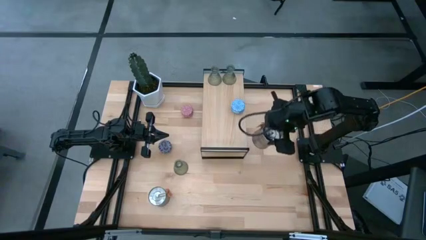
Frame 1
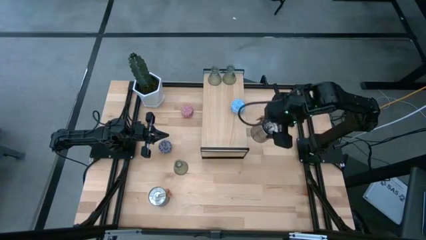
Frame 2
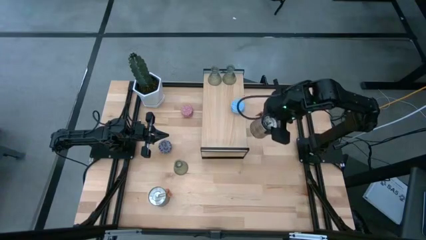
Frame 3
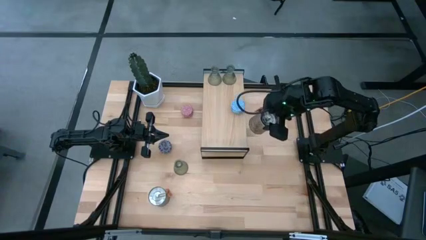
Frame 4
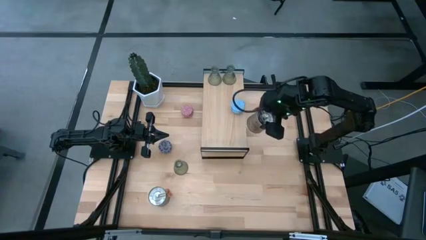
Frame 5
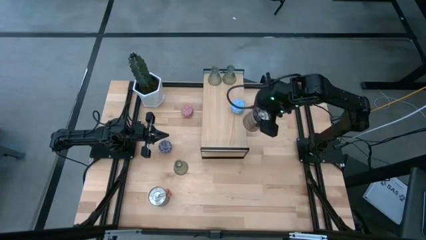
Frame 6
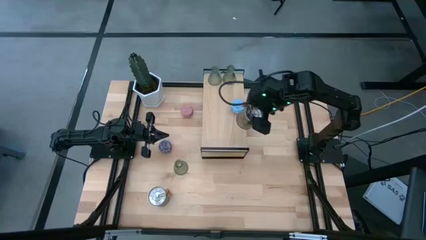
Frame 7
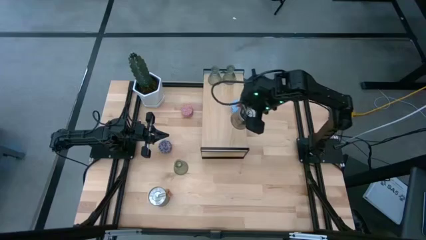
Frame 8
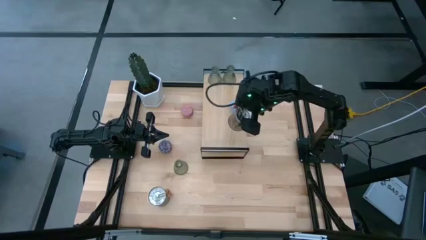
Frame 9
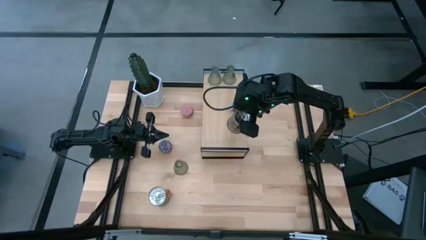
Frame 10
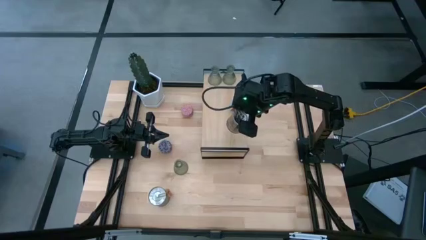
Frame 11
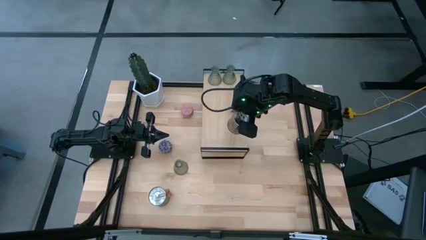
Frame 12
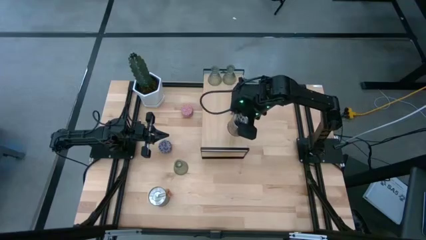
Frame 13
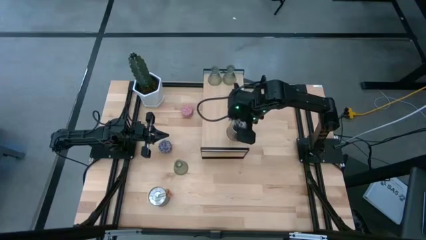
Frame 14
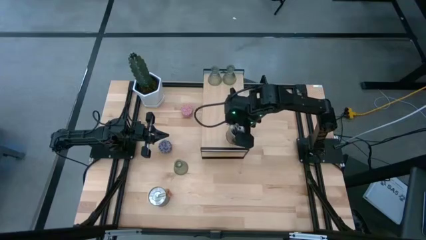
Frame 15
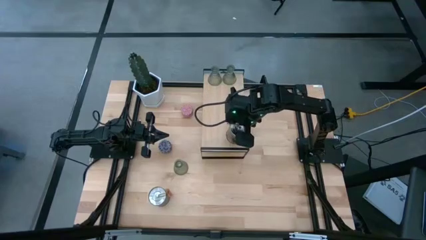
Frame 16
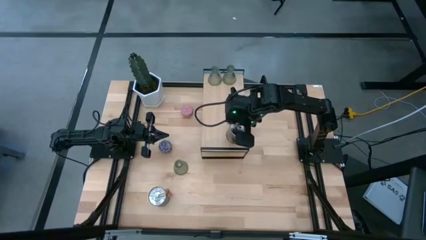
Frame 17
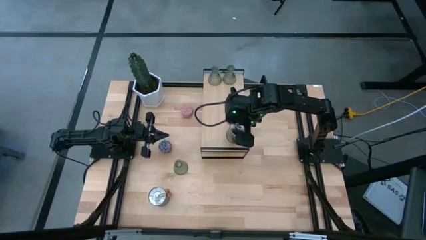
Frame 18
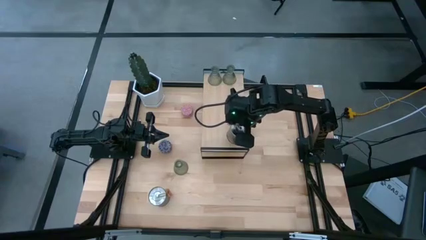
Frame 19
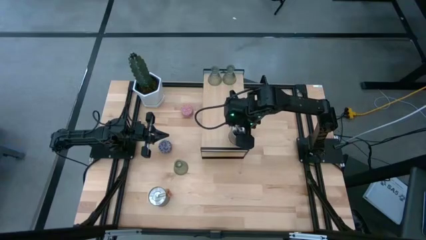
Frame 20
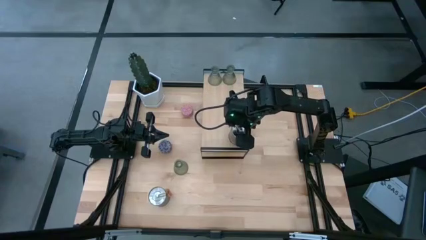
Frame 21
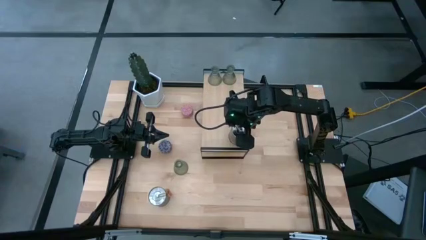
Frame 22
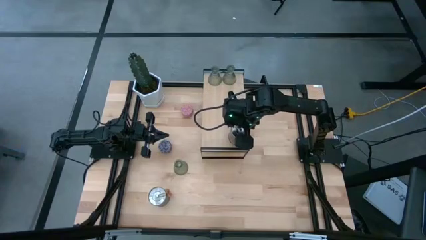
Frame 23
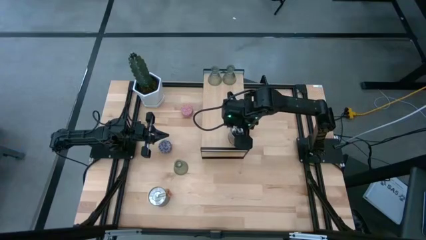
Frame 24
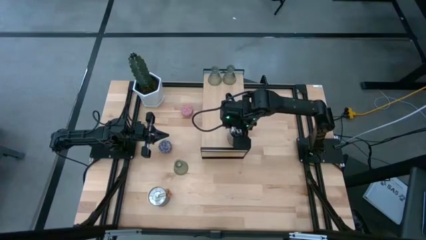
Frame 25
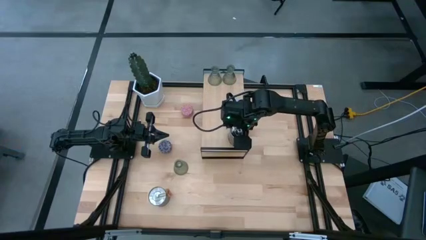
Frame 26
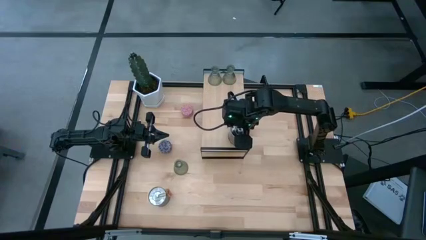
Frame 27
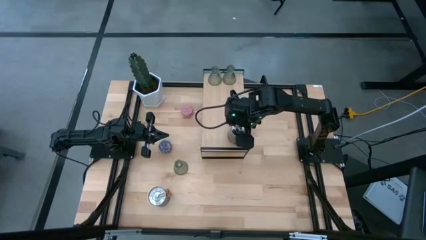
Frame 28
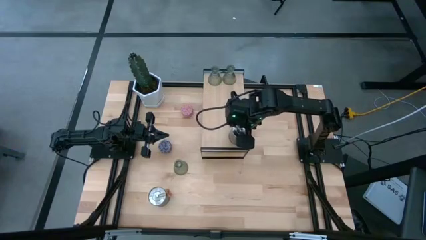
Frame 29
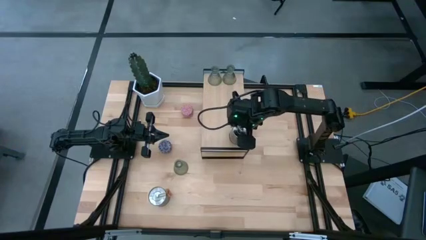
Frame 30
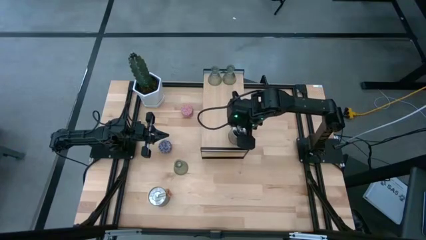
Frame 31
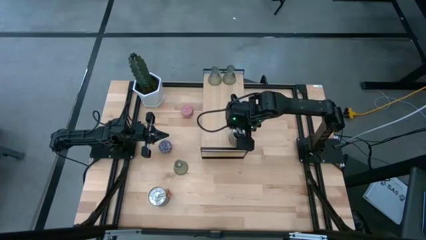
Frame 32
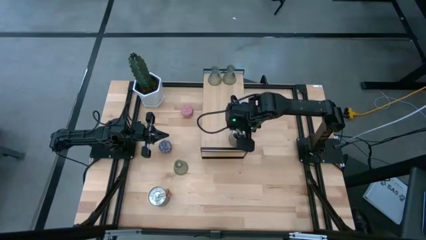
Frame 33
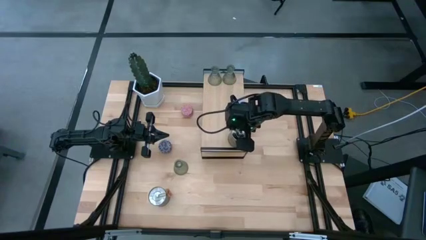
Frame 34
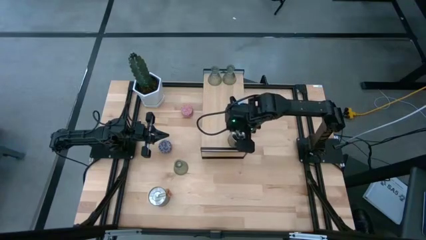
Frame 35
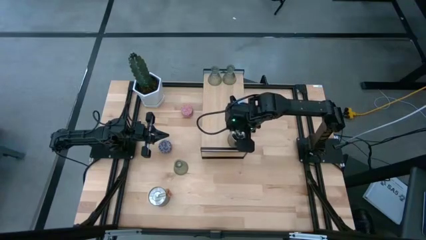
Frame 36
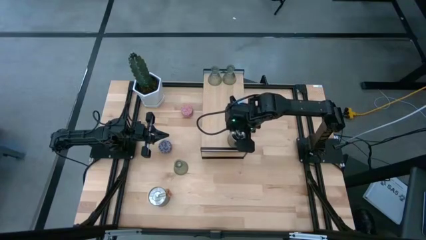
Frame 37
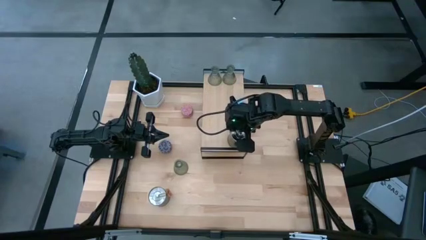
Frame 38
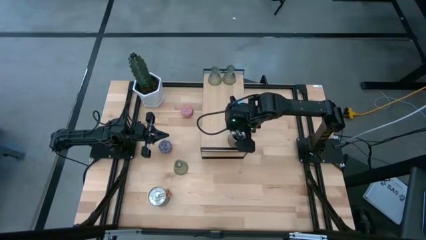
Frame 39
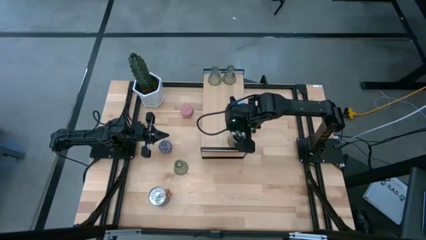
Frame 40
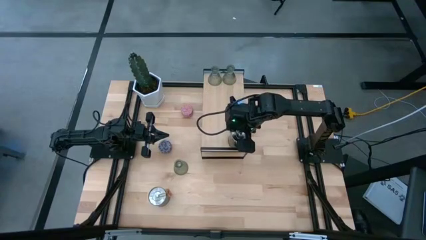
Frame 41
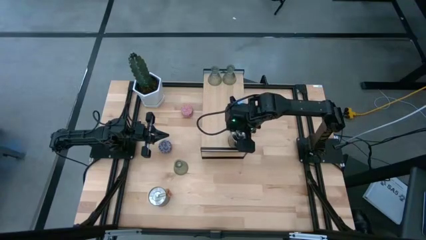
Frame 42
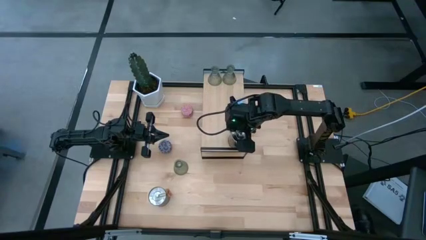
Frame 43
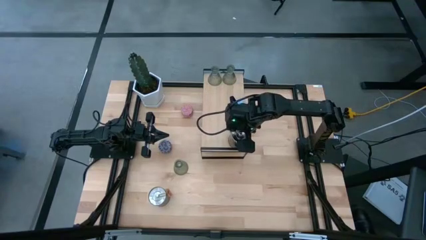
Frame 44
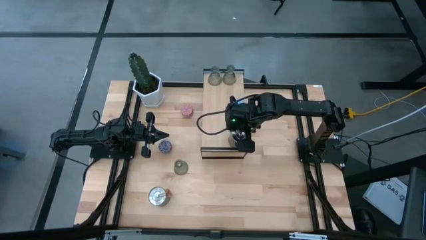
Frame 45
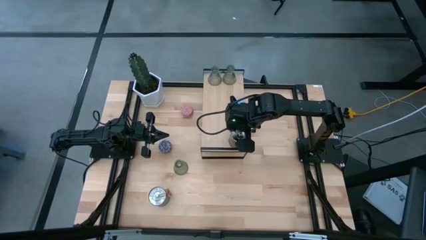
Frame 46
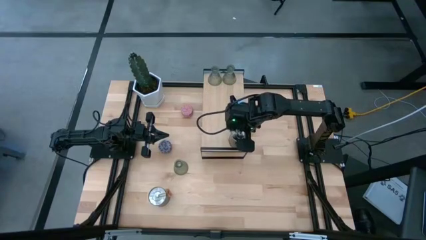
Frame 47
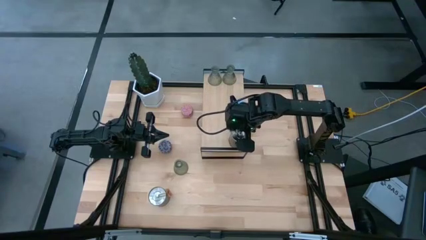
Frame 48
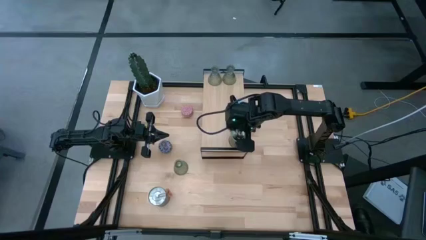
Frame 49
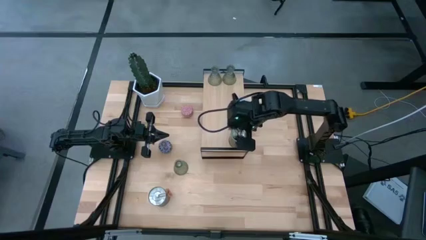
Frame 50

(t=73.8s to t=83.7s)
Task: Pick & Place candle stick holders
Put the right silver scented candle can on the shelf

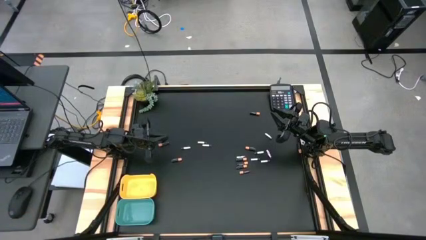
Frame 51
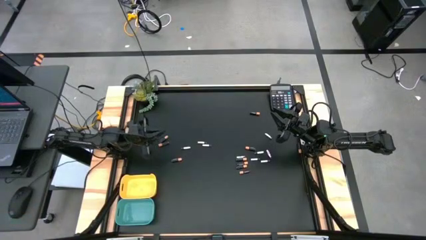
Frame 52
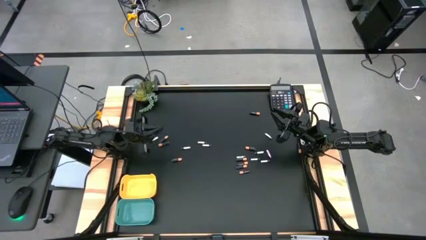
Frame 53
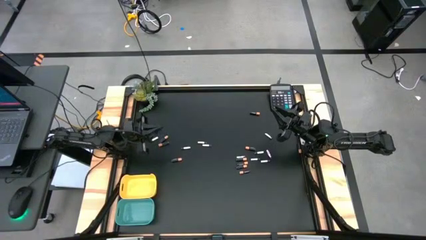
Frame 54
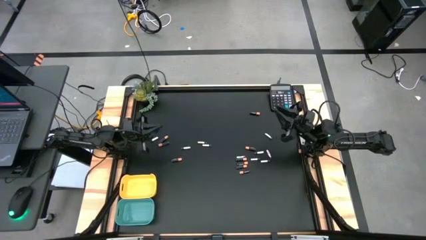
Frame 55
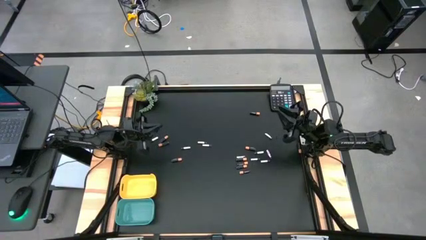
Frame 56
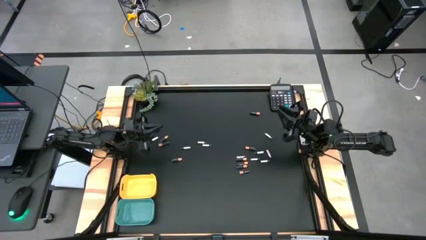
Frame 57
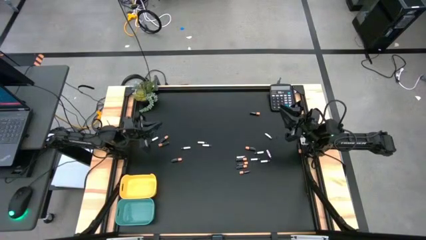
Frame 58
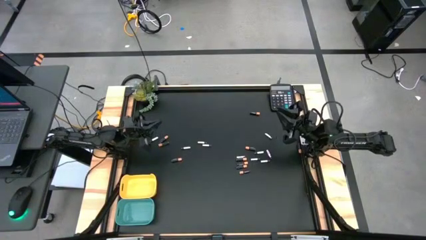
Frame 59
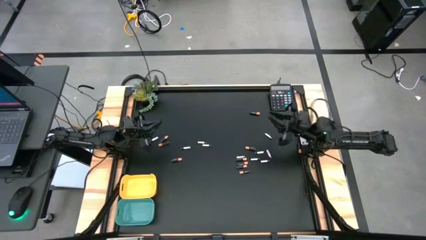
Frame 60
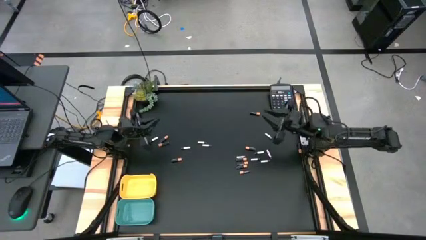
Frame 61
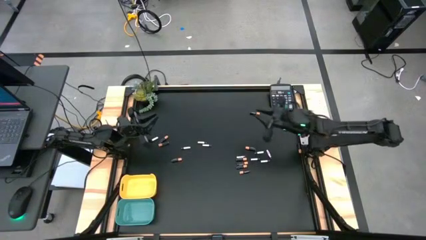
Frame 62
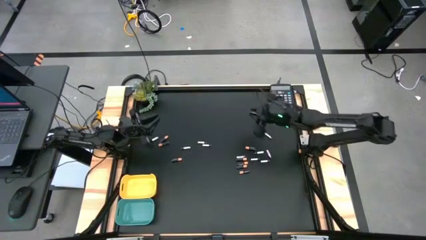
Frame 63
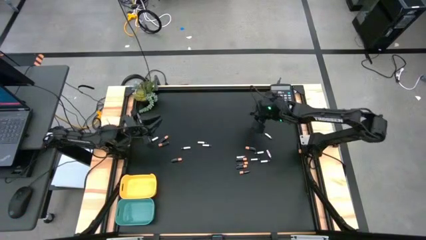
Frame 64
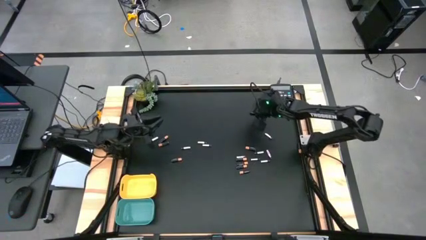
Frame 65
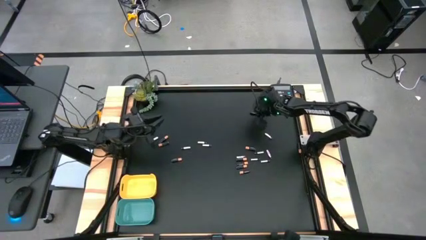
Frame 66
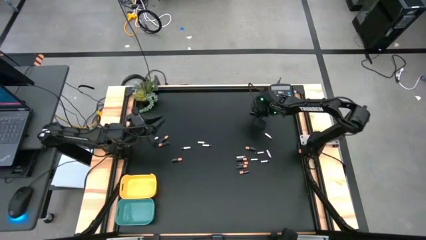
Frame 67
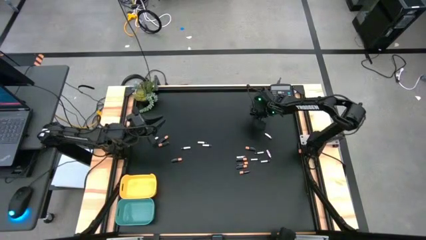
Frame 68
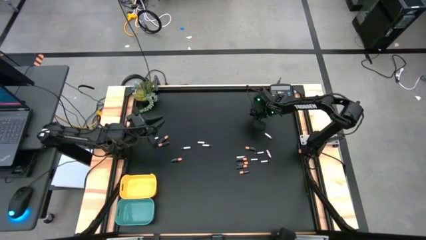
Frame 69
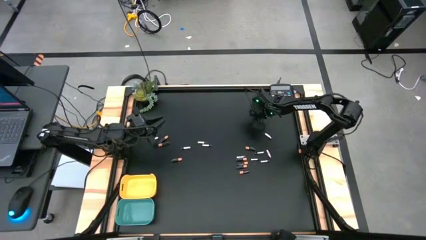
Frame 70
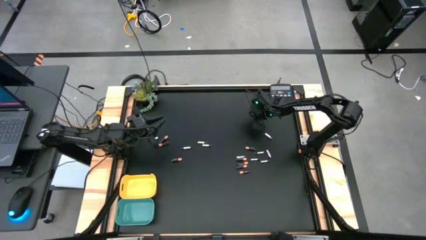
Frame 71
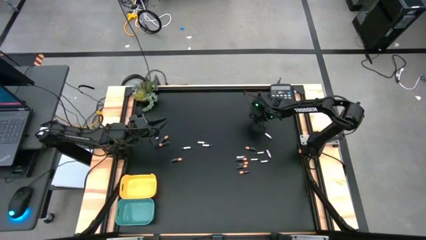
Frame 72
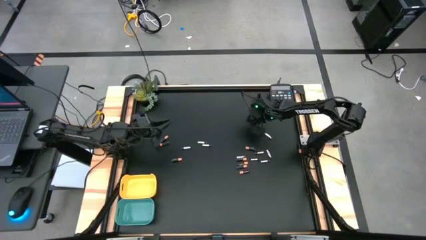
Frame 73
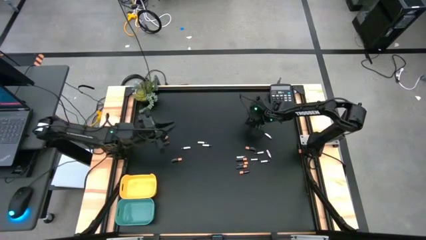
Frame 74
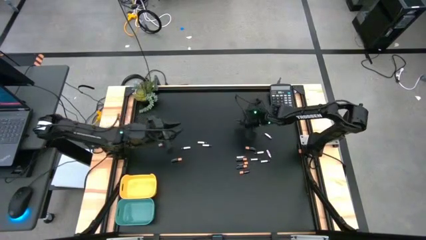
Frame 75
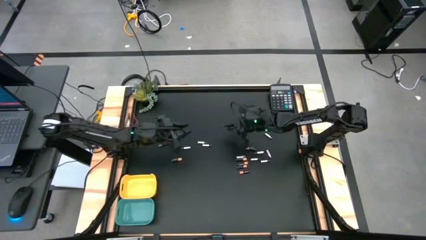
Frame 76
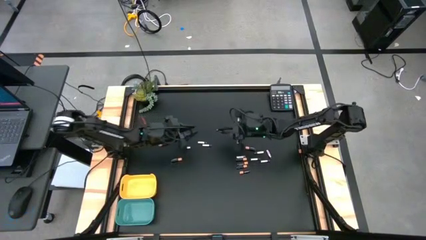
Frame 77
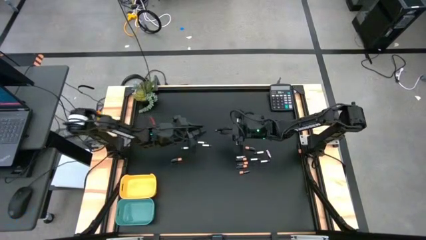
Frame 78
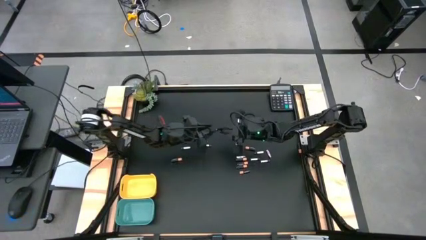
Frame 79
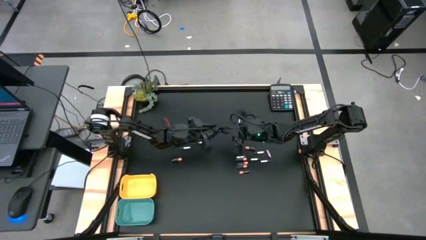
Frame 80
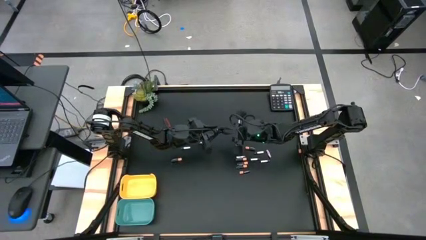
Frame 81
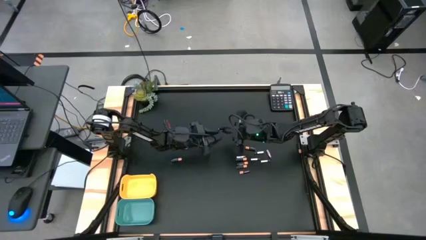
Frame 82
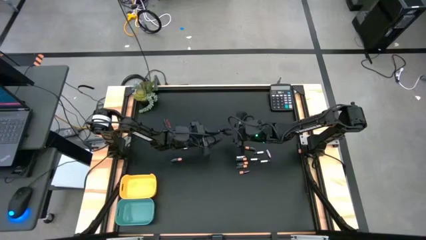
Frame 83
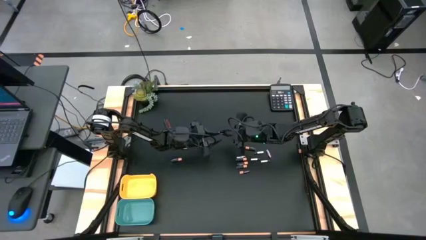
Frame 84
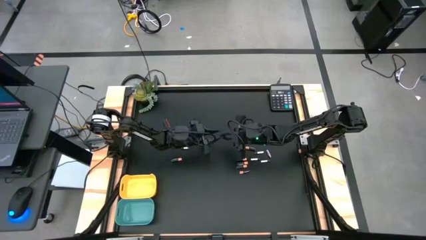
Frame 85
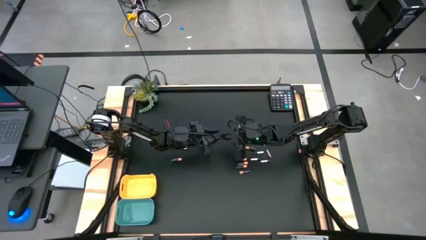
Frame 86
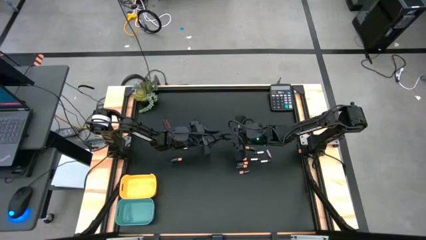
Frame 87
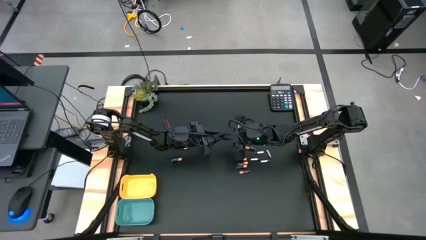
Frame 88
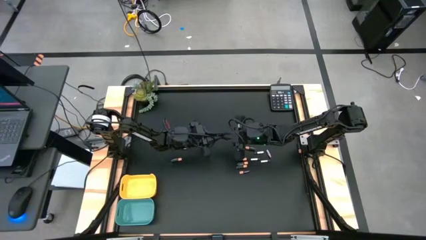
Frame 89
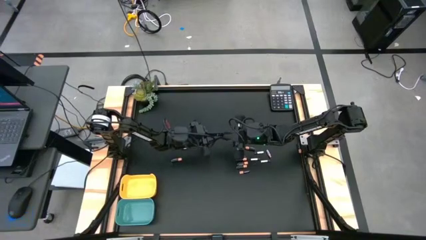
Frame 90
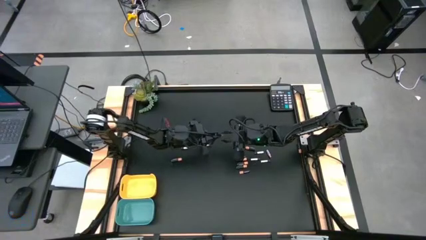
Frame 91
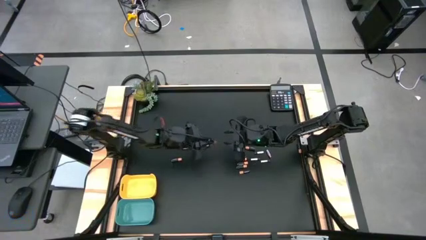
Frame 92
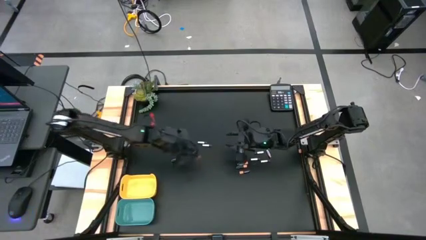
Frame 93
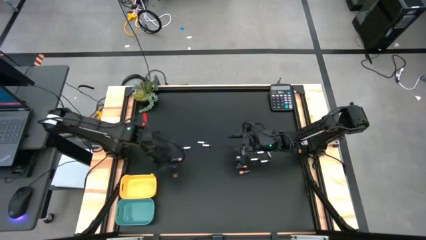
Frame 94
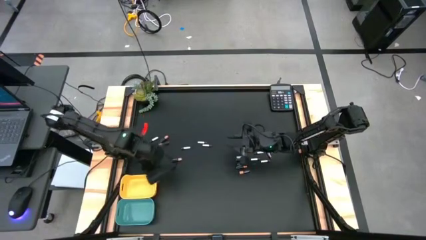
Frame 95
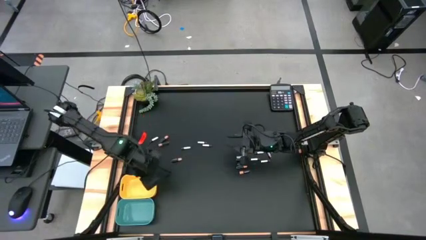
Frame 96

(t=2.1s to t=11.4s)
Task: Sort batteries
Put the black battery into the yellow bin
